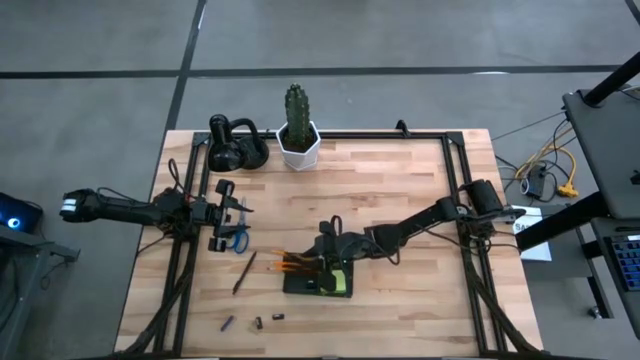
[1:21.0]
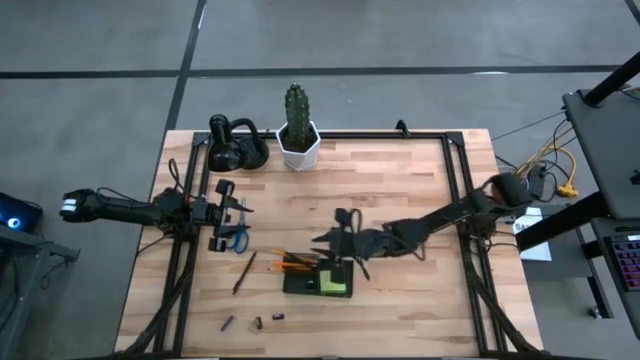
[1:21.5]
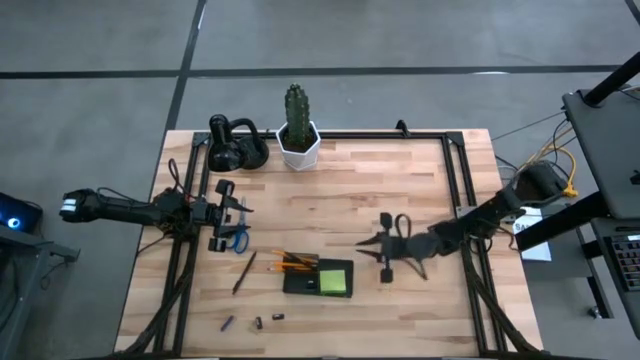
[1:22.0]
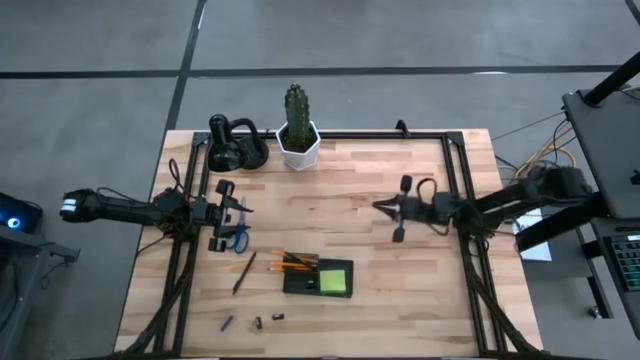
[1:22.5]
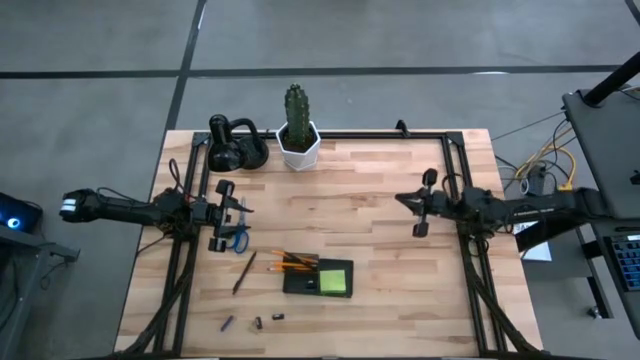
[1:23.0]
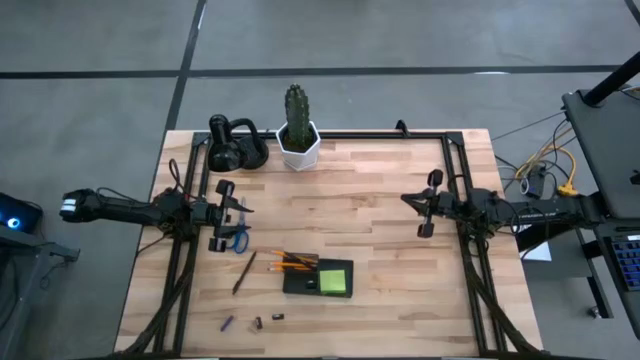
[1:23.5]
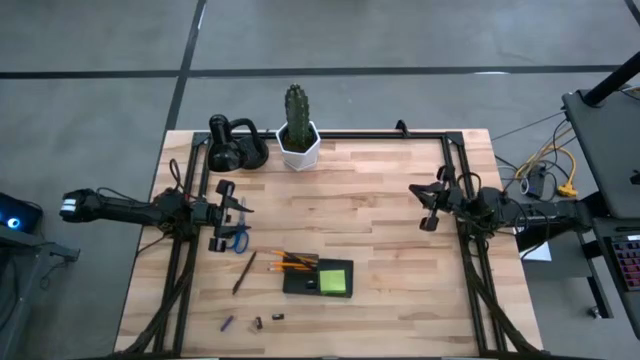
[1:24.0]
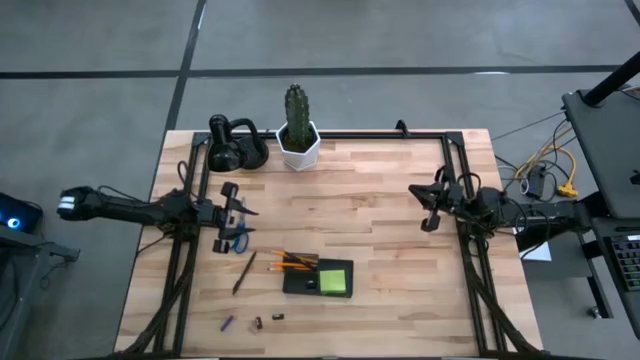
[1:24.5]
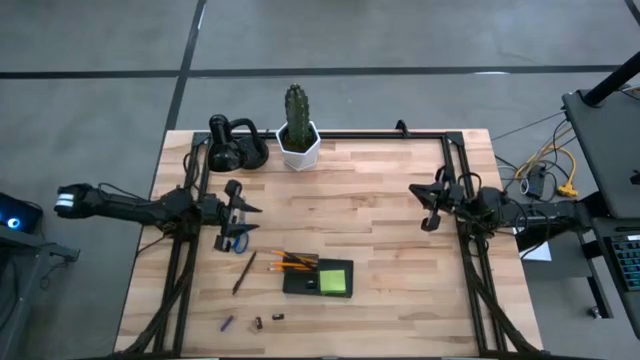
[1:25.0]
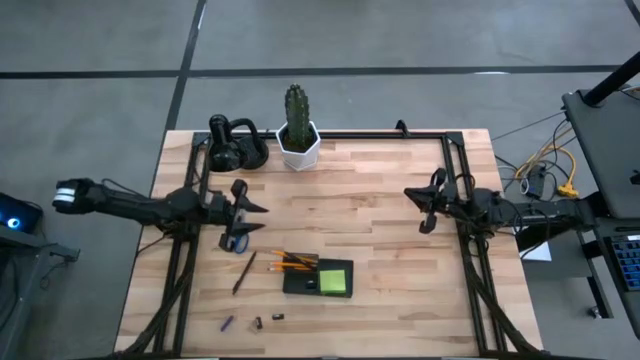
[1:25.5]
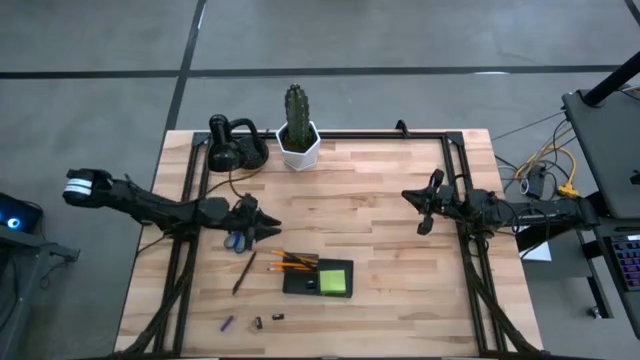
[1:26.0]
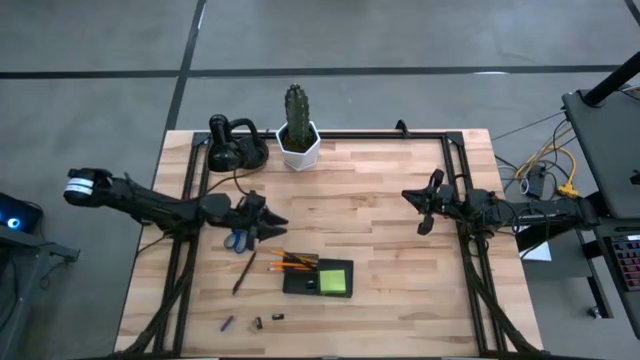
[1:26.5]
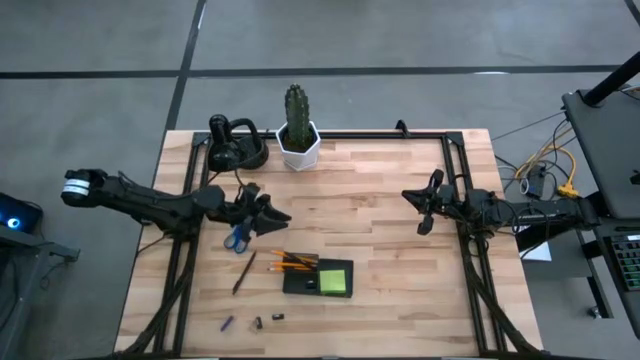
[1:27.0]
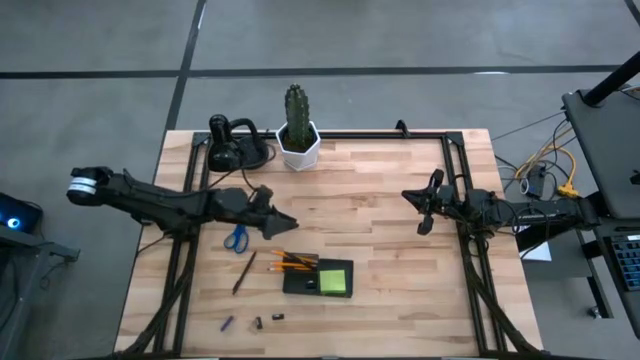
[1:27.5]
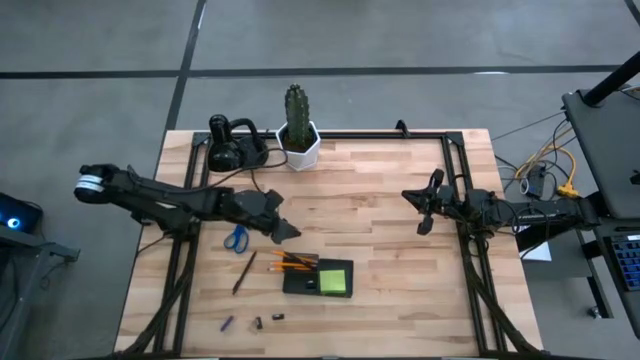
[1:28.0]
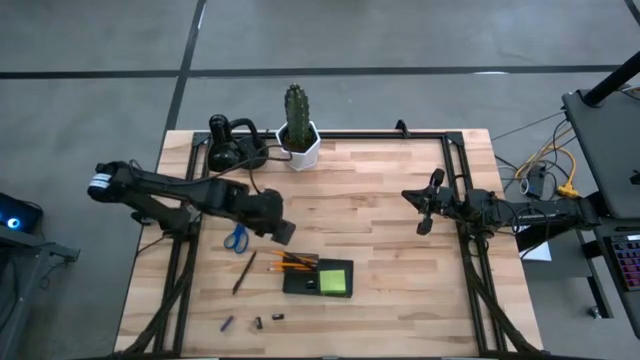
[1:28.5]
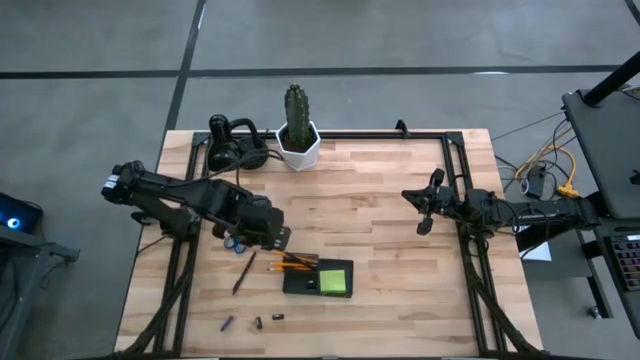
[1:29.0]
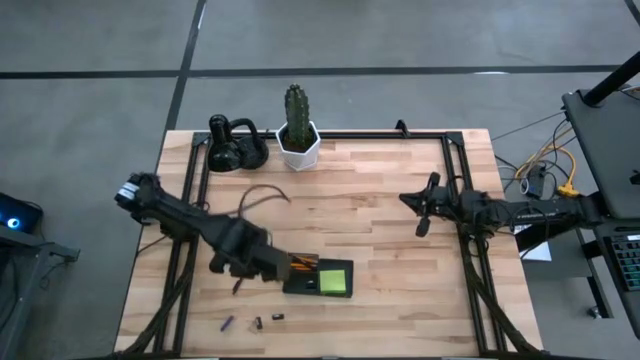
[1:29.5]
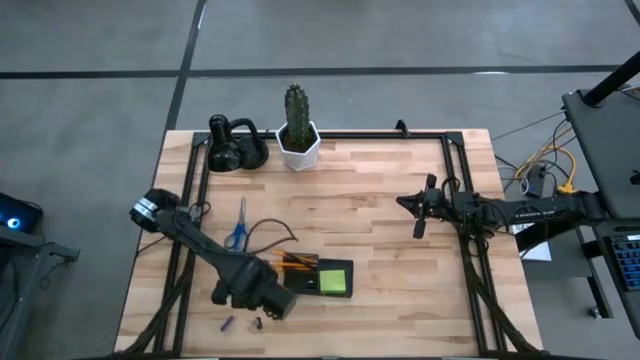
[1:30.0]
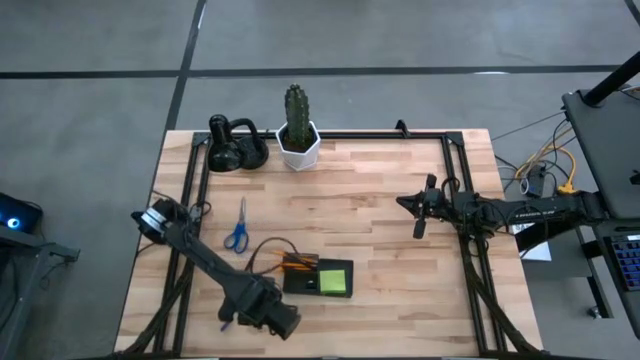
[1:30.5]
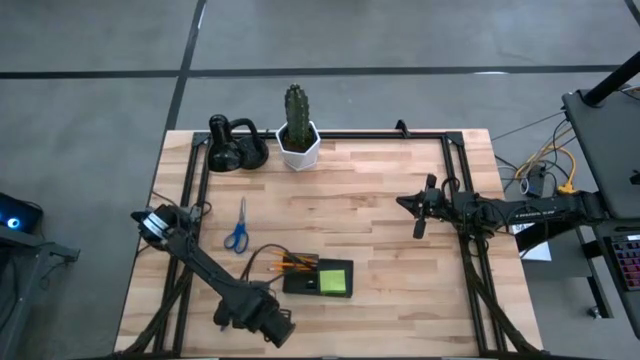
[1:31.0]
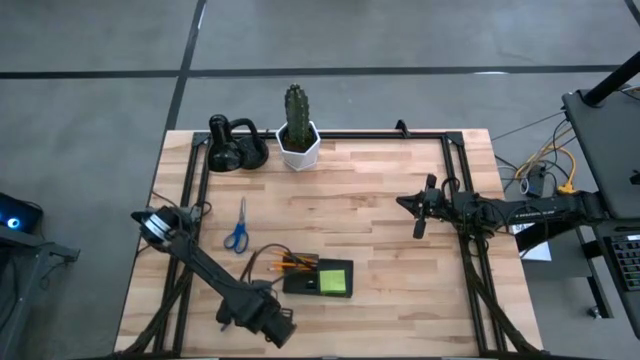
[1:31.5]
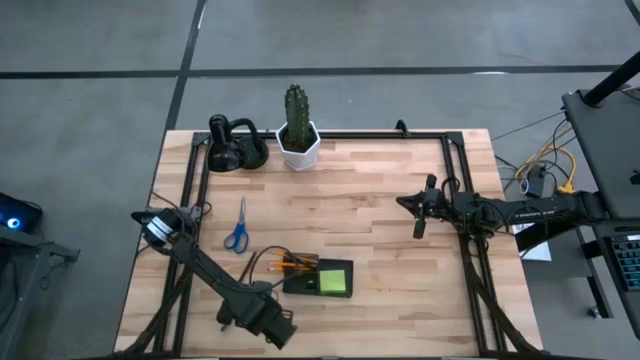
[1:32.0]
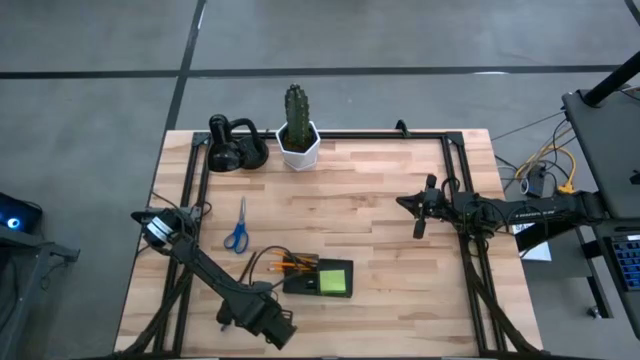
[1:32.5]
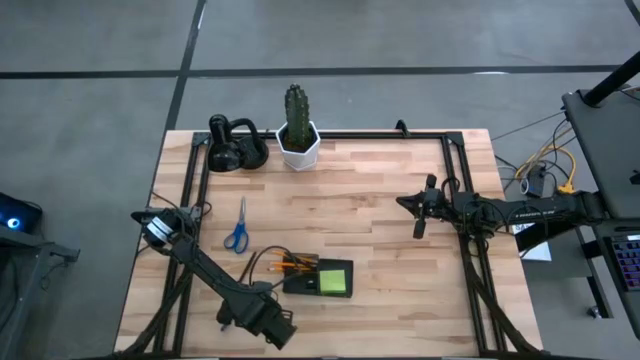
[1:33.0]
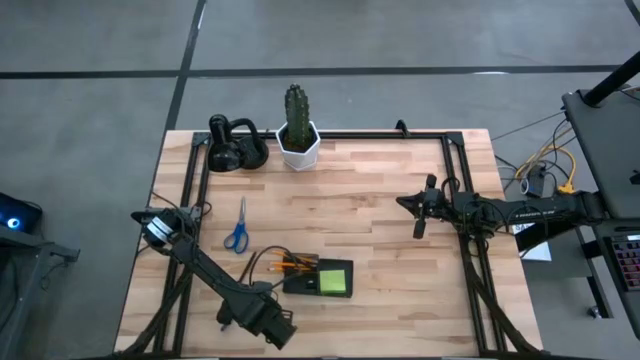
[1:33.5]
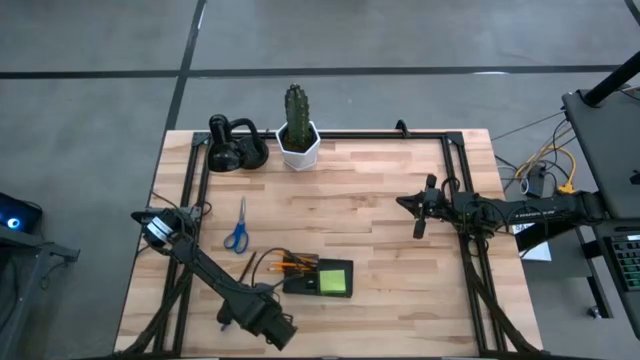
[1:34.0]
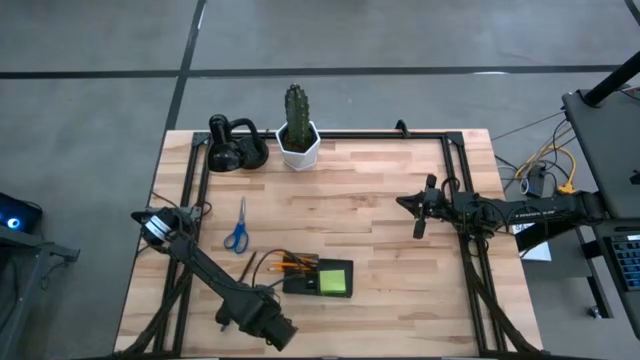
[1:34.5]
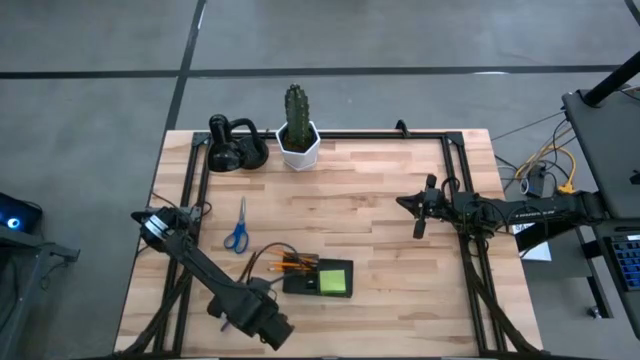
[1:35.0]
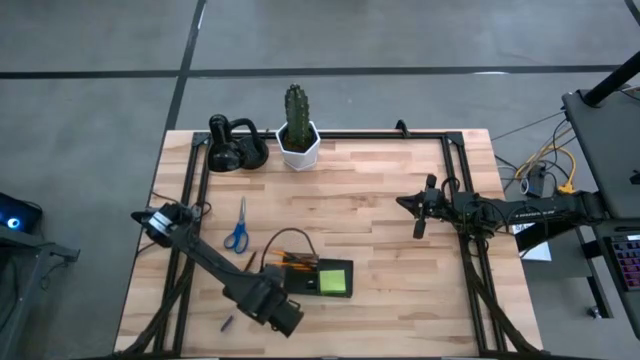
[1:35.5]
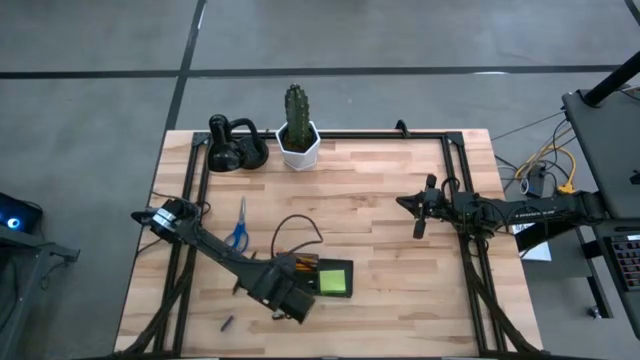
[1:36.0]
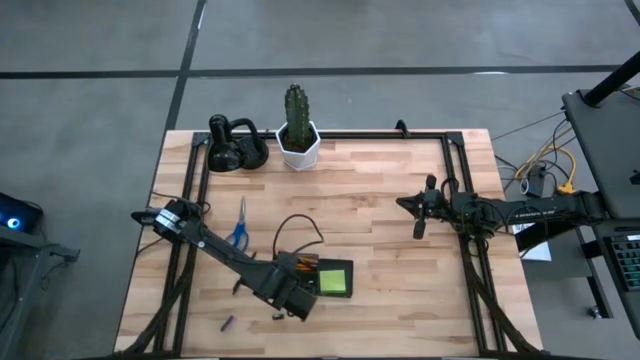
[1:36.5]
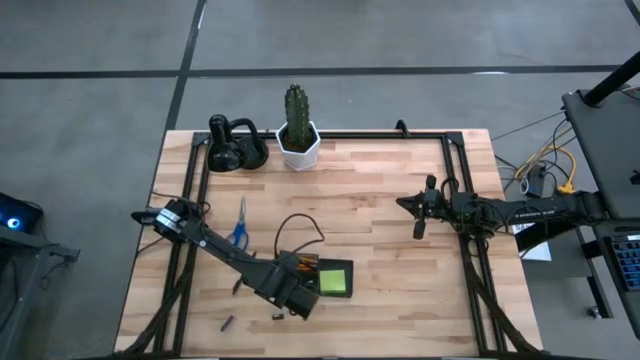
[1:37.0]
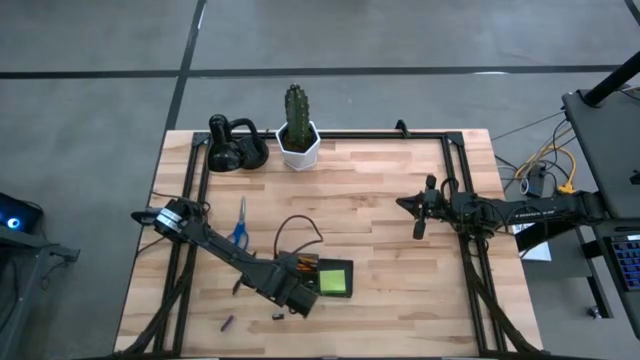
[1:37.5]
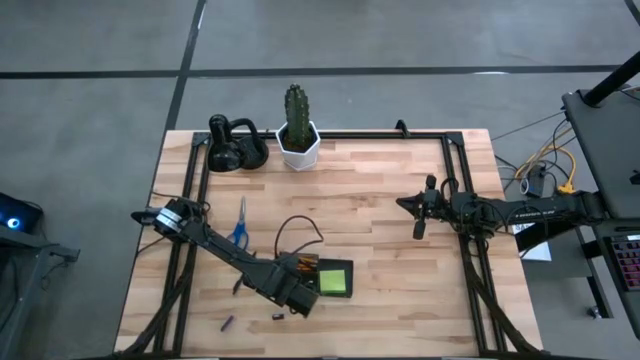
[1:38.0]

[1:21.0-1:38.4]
Task: Pick and place office supplies into organizer
Put the left binder clip into the desk organizer

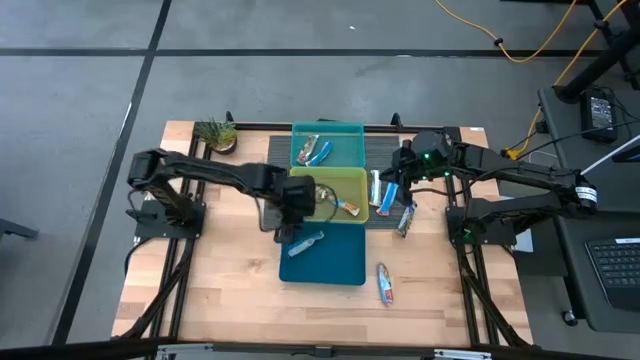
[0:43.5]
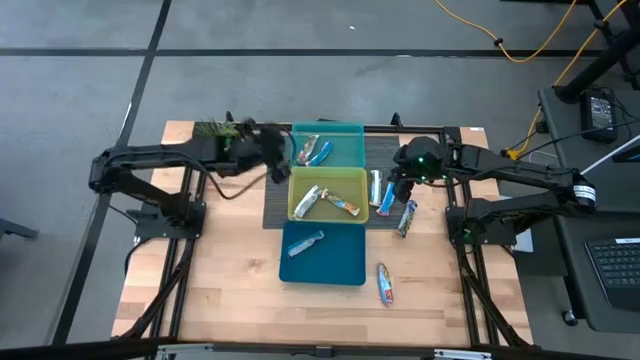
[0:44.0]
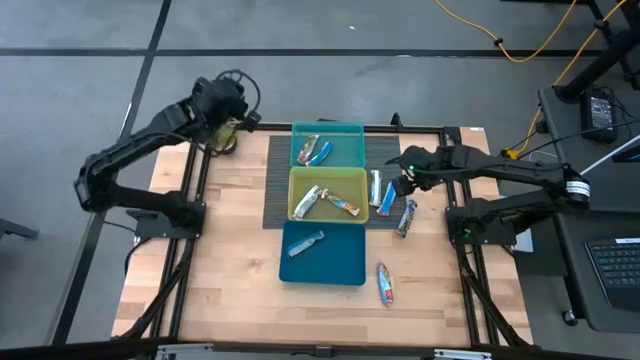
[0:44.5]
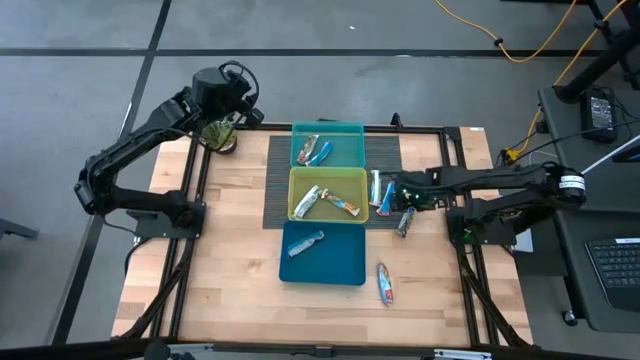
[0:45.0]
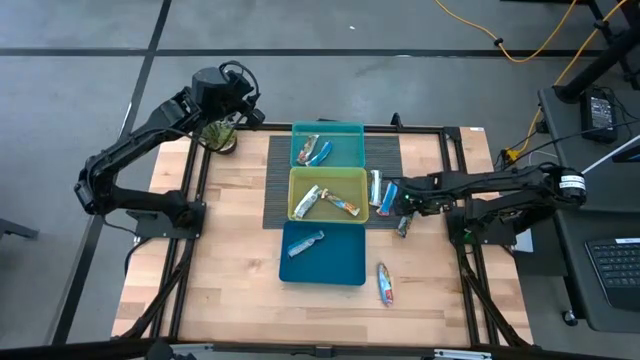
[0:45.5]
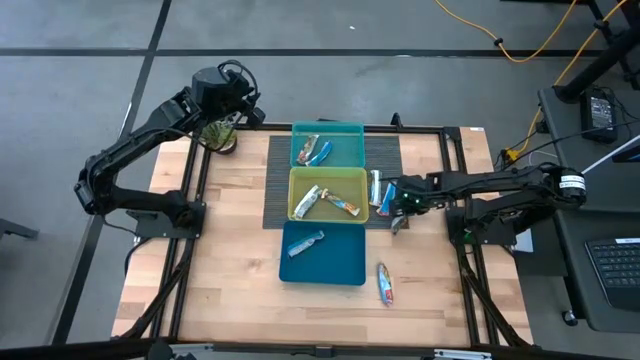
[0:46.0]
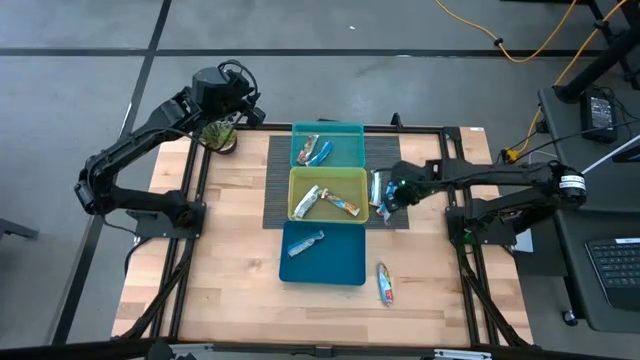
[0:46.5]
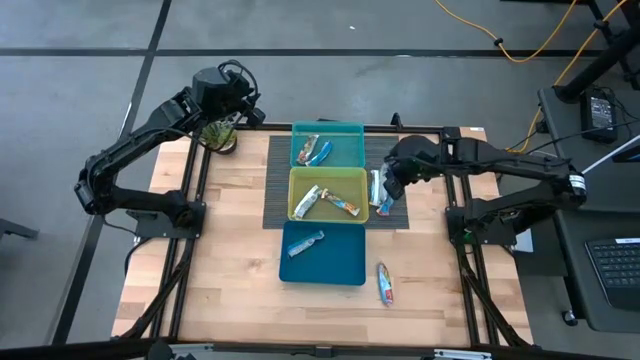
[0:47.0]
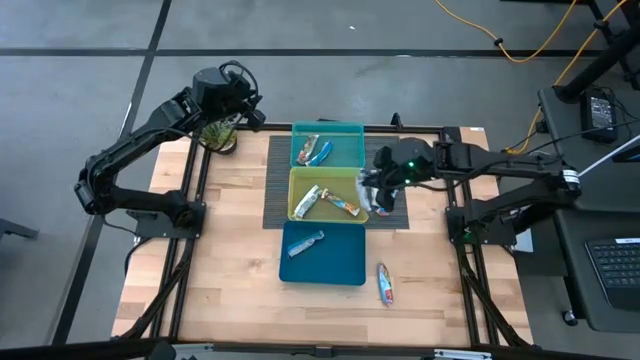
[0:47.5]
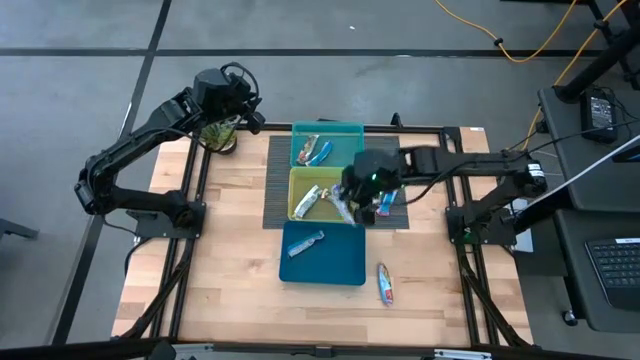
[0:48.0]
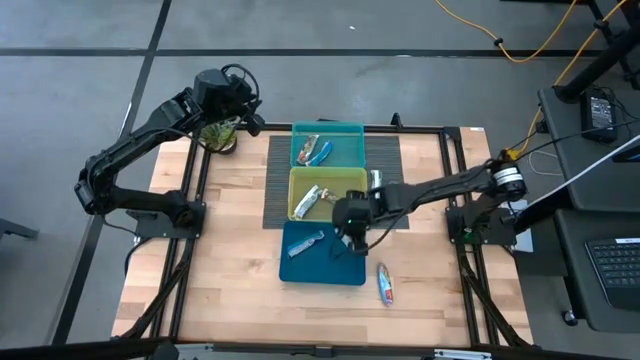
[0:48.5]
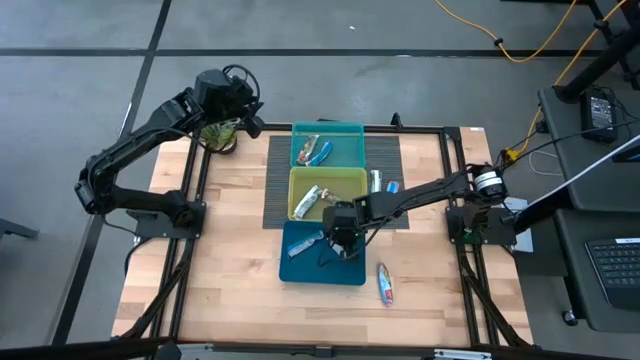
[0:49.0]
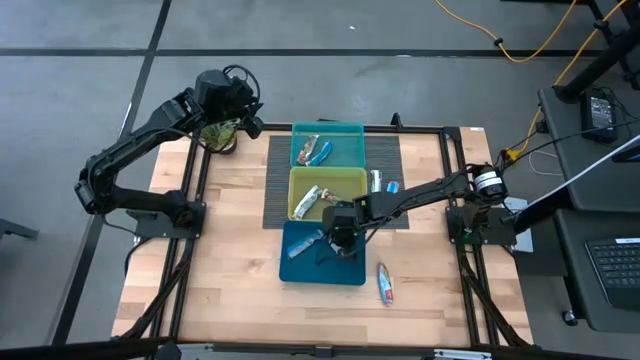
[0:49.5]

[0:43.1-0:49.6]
Task: Pick and place Granola Bars by type
Put the blue granola bar into the blue bin
